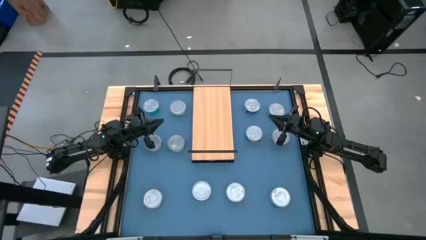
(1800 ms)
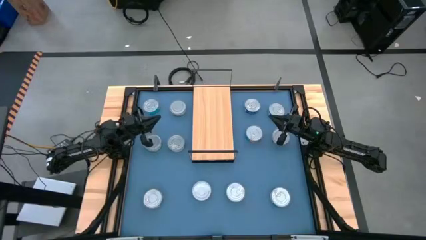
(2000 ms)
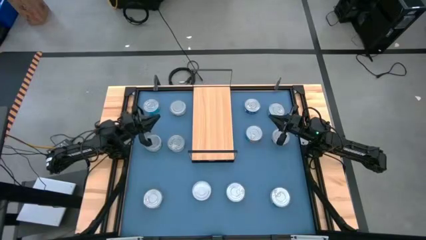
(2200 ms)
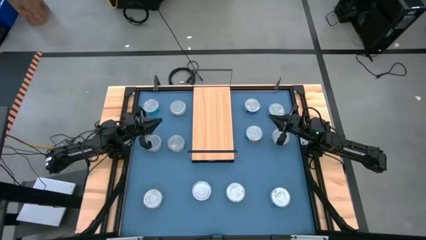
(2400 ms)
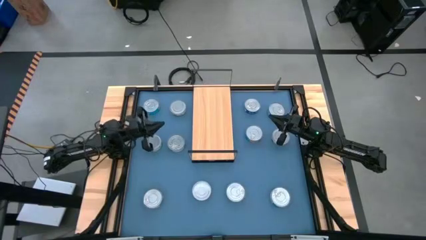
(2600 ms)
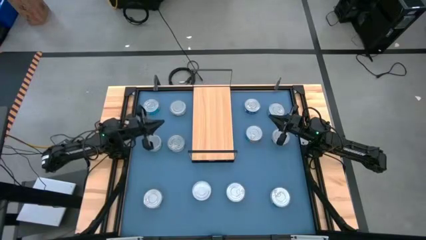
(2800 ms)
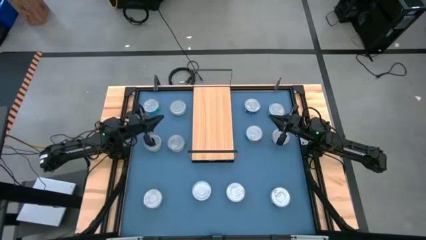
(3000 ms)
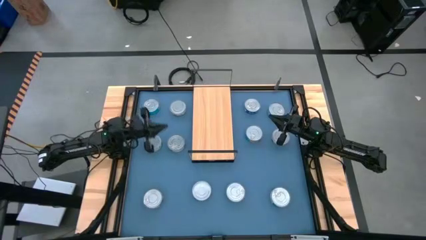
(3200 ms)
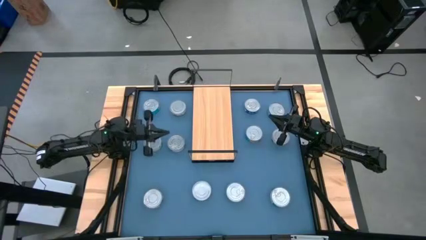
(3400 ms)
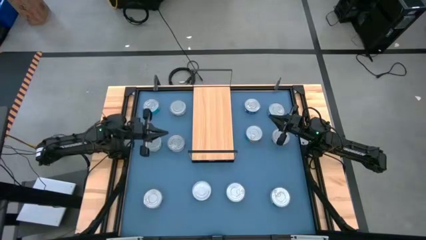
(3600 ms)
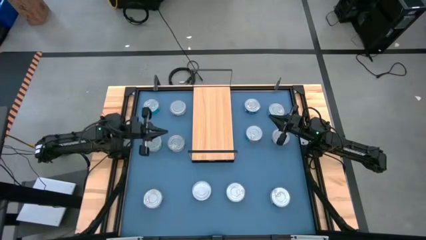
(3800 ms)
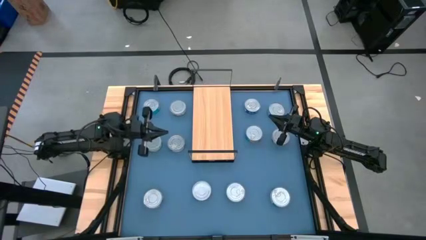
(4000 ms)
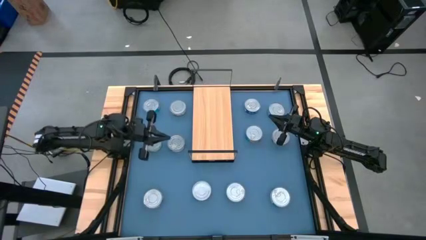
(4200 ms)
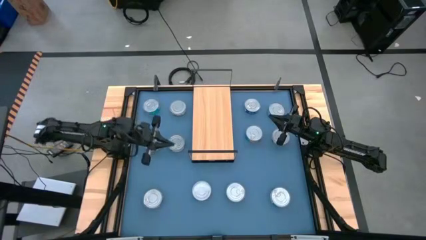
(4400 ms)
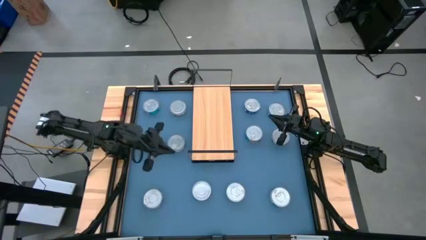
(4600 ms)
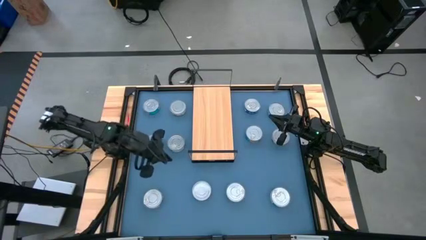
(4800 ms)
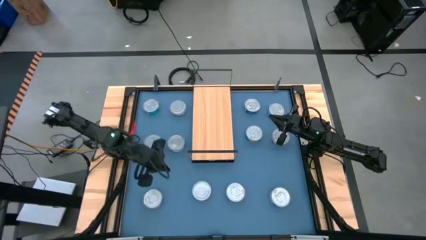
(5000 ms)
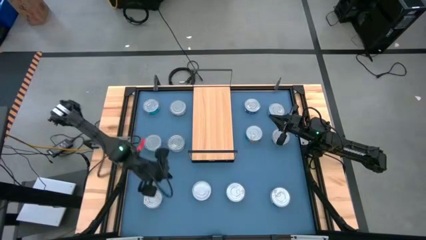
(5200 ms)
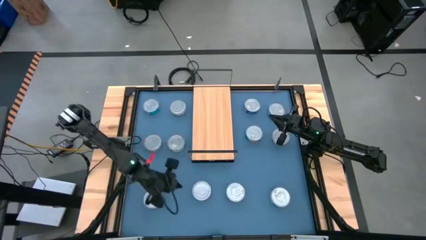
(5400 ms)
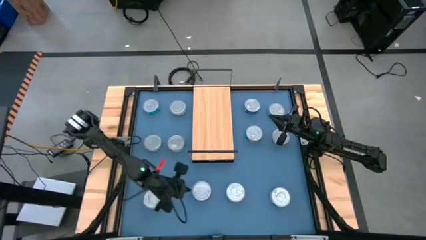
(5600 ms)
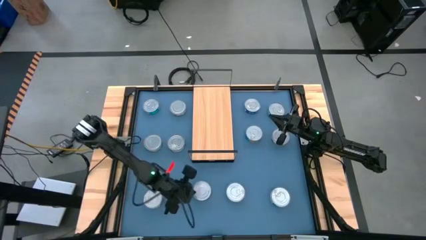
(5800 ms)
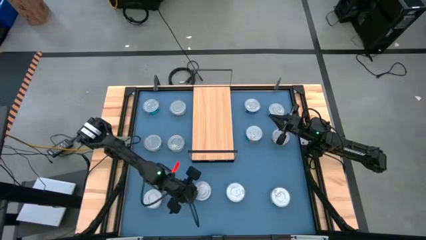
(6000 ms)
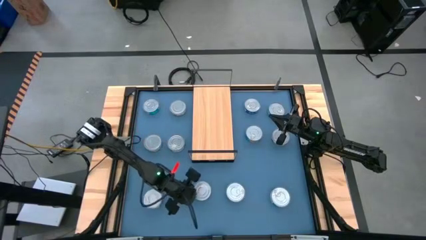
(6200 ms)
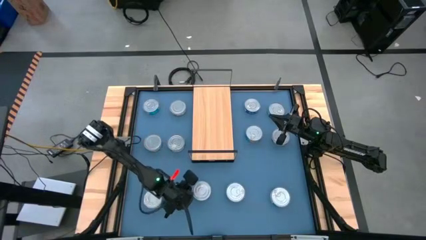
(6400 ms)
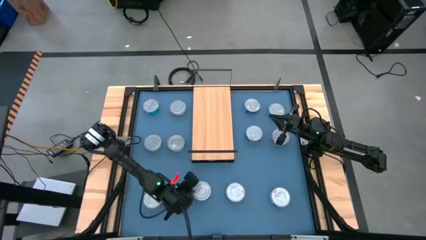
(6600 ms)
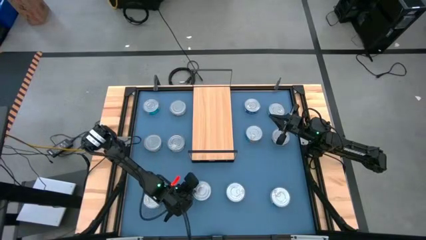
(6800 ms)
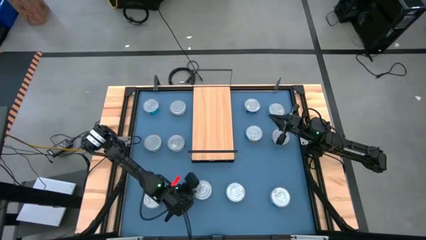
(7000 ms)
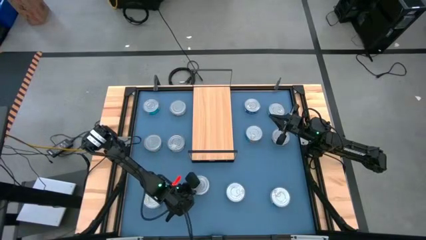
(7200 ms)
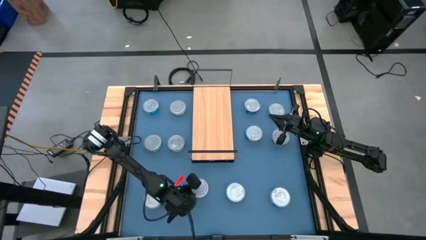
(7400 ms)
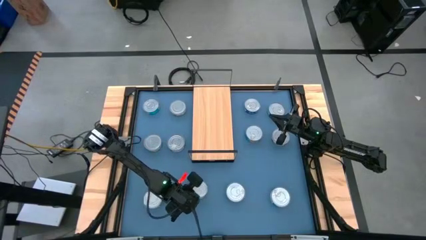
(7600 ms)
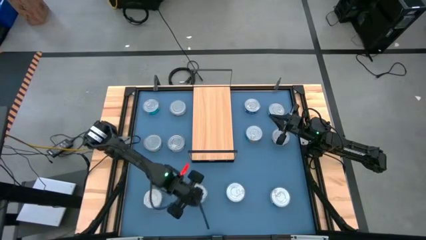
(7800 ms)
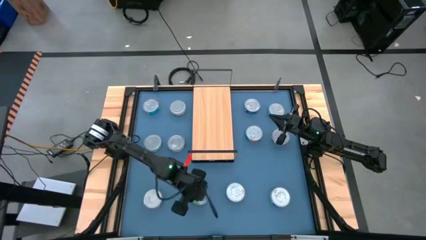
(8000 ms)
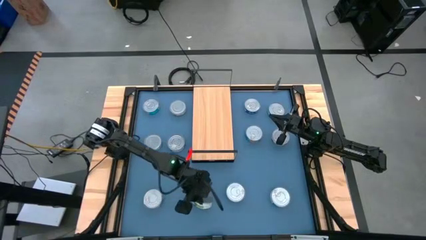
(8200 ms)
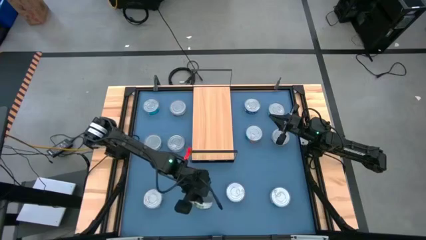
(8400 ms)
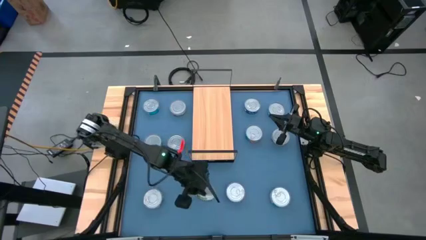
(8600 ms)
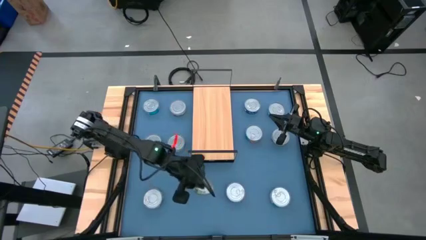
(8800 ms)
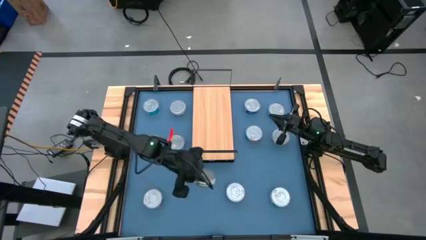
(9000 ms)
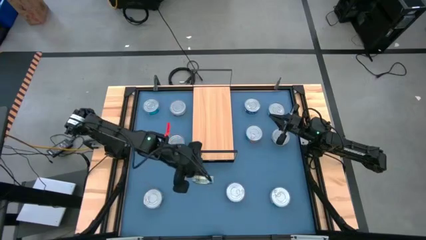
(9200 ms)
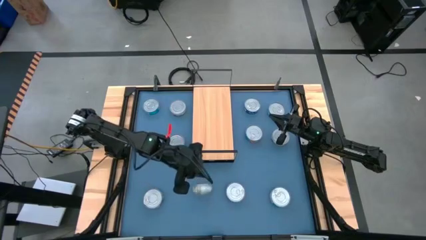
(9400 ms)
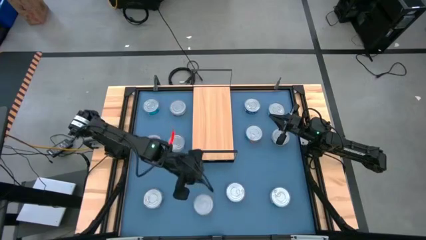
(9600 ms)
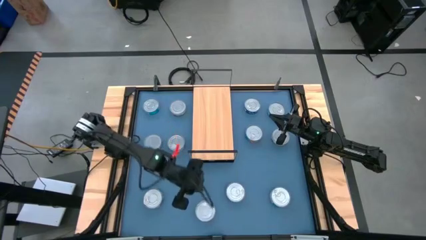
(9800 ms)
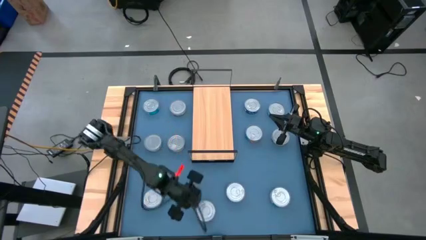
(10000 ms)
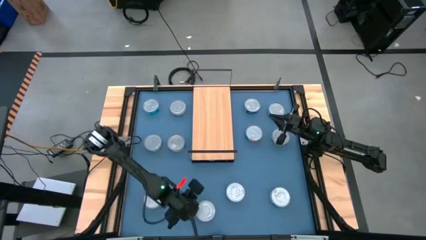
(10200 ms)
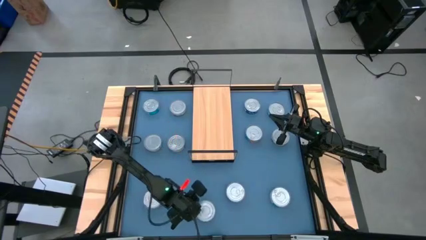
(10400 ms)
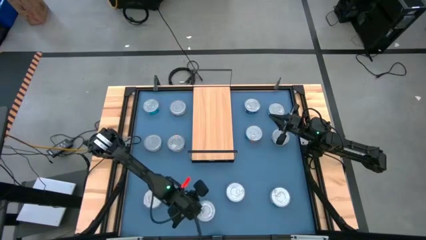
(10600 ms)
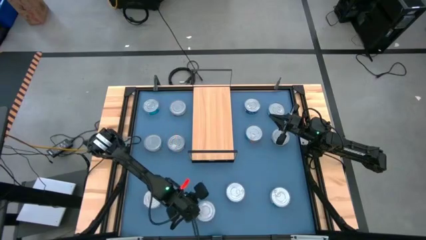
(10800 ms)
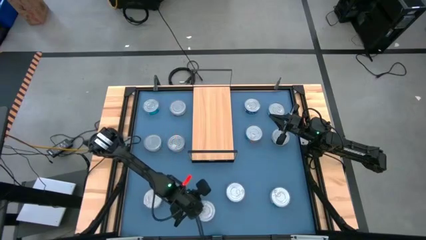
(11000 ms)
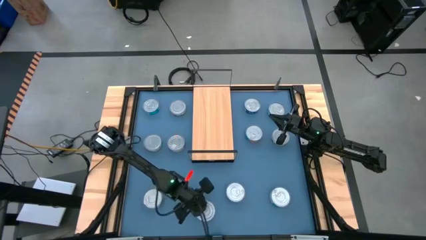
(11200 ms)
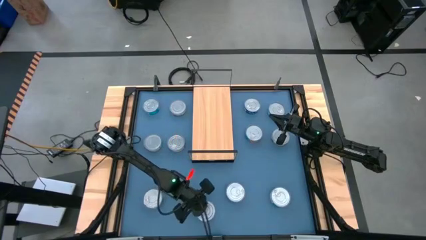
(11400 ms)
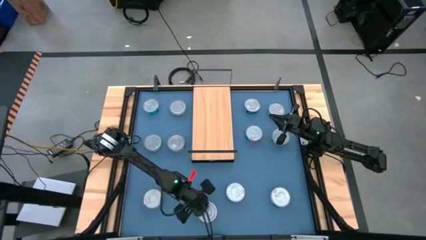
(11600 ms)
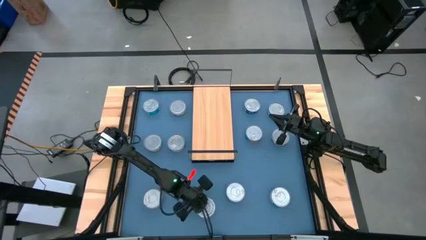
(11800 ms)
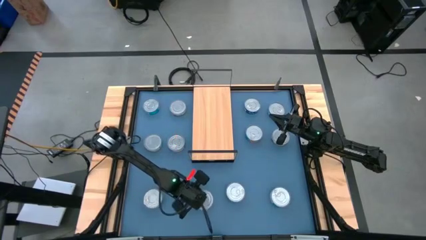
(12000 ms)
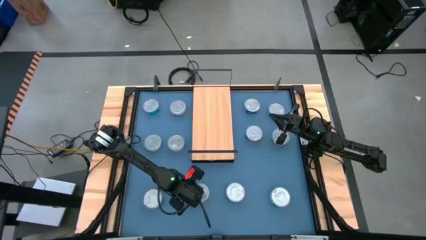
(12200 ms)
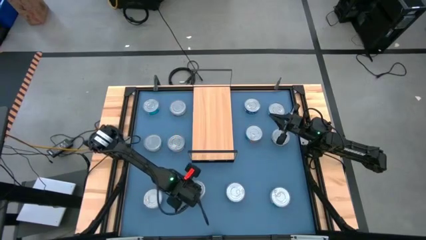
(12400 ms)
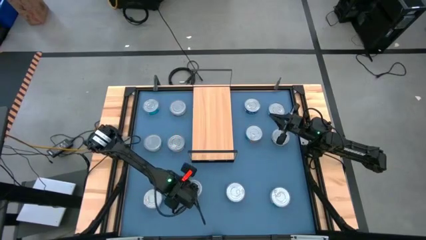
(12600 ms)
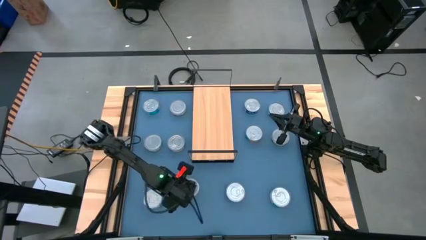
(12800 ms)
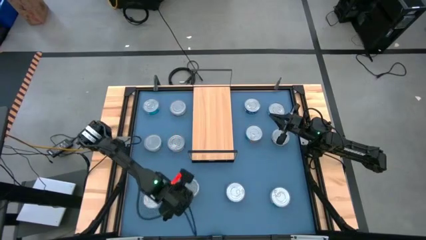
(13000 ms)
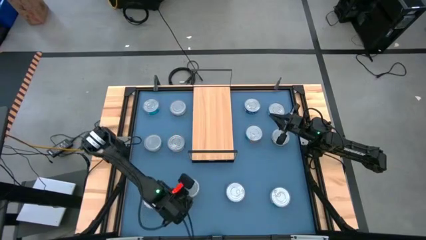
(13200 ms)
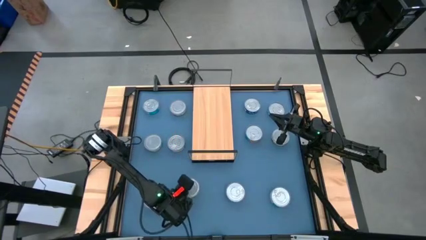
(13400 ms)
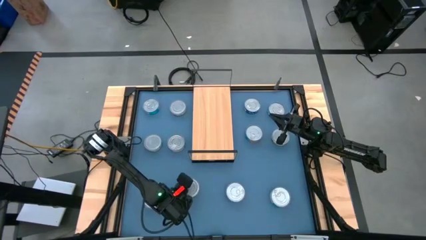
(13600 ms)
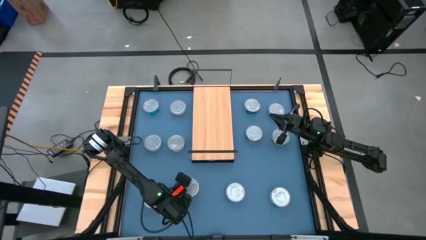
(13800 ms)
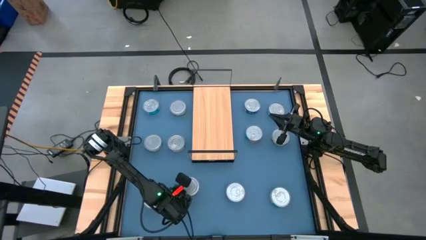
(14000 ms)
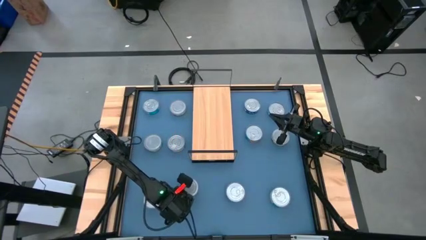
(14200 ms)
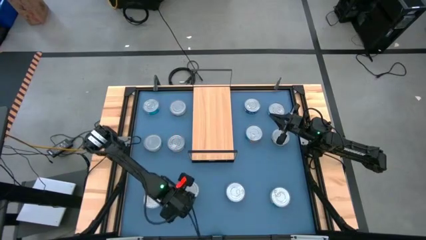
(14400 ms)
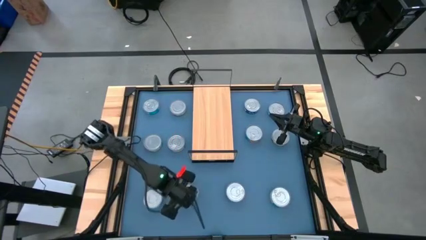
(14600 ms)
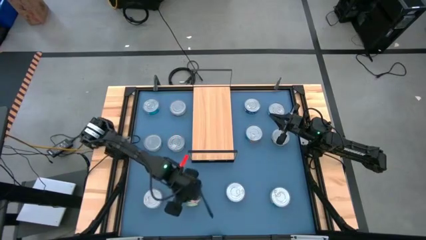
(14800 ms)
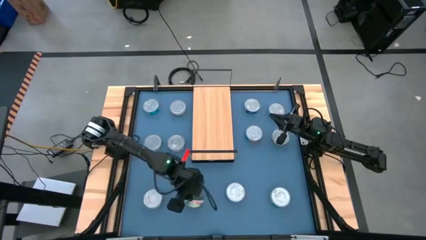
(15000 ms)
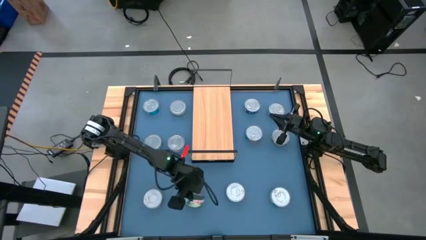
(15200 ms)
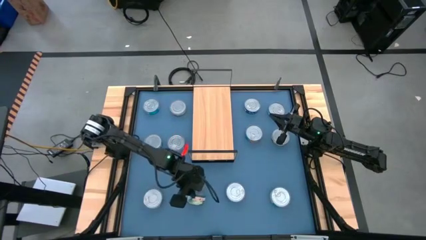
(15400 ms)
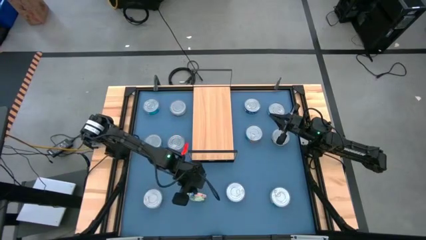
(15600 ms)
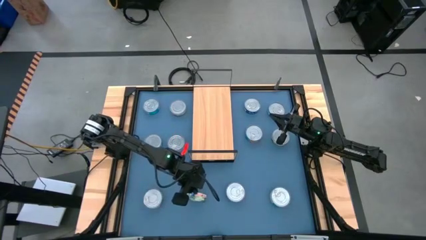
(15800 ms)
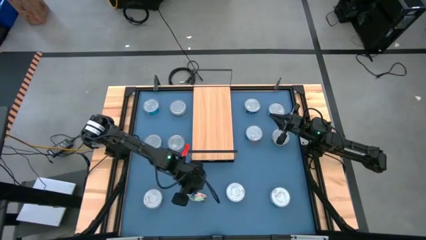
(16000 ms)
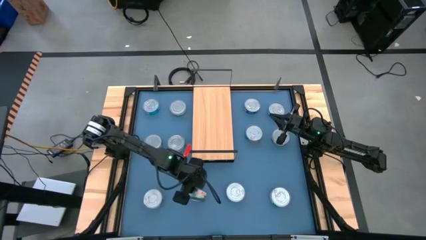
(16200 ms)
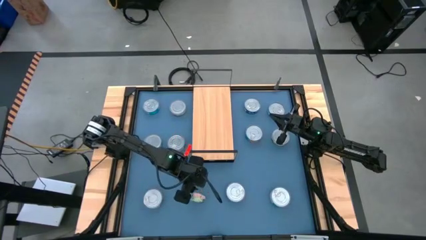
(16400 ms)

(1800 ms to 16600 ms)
Task: Stack canned seafood by type on shelf
Put the green tuna can on the shelf
